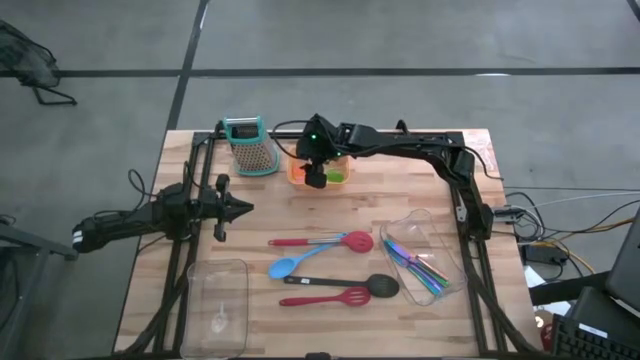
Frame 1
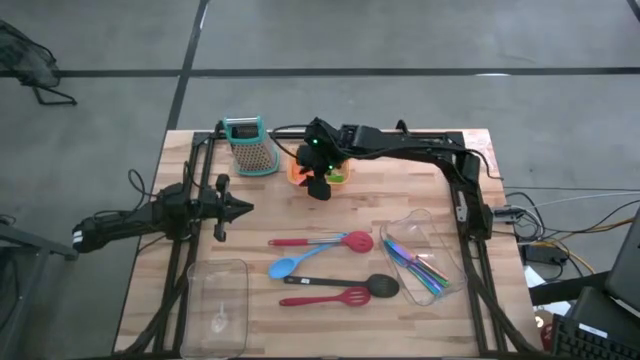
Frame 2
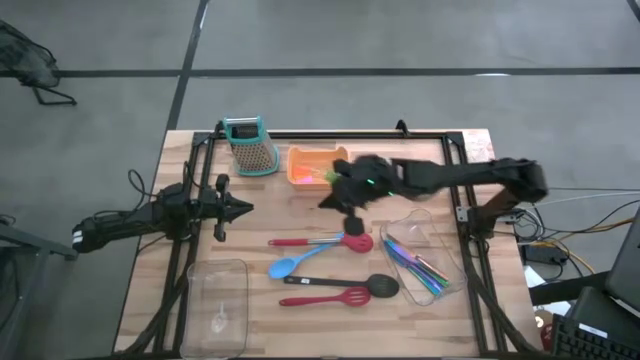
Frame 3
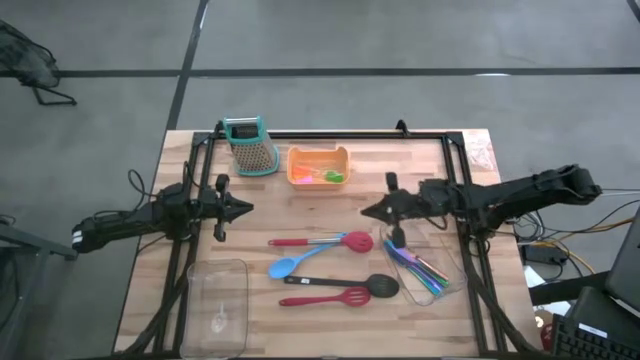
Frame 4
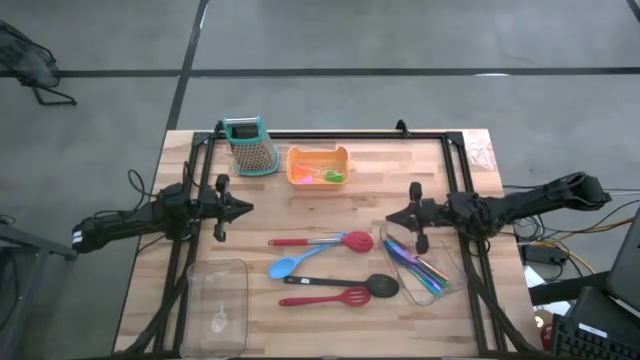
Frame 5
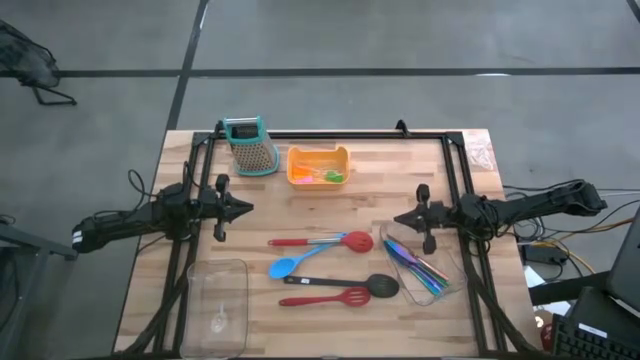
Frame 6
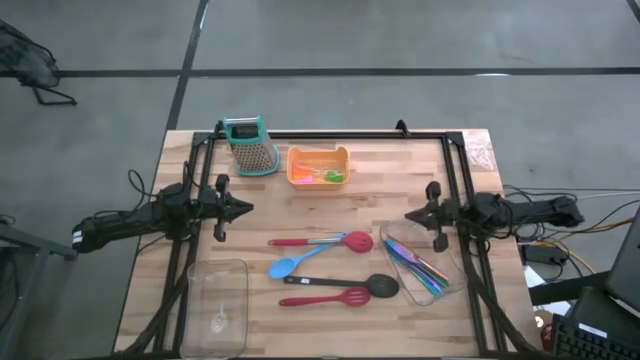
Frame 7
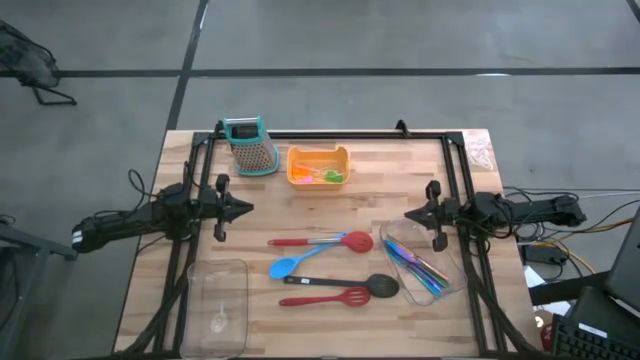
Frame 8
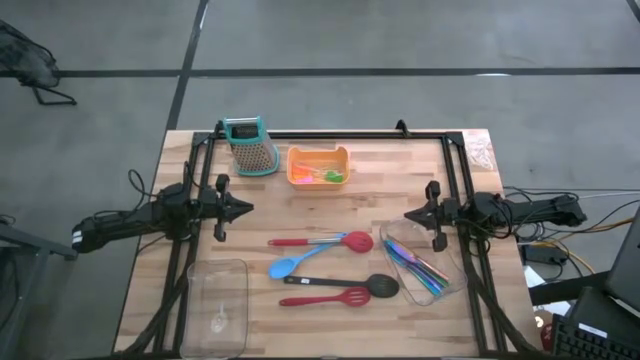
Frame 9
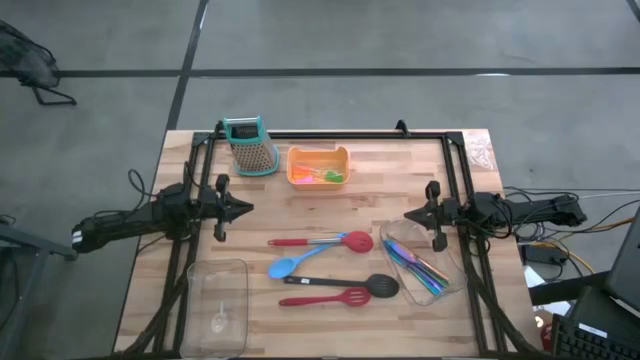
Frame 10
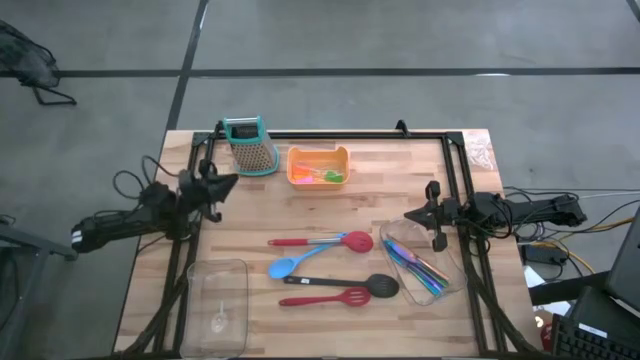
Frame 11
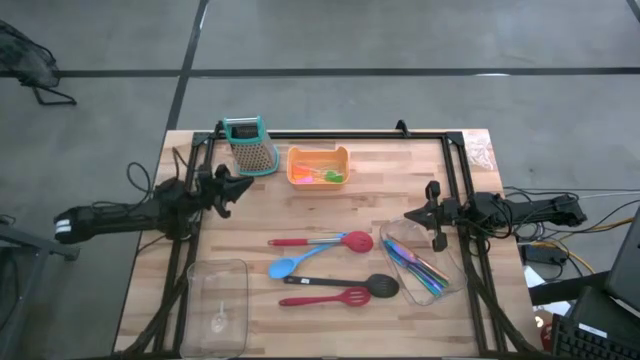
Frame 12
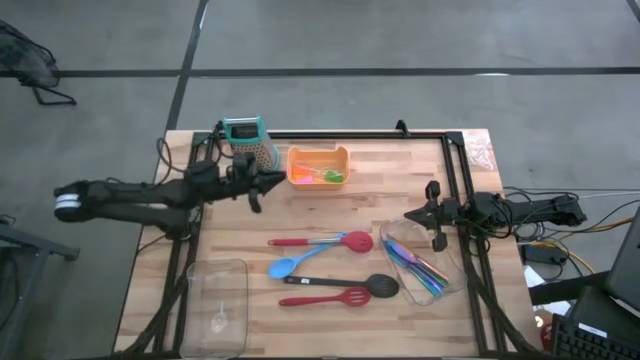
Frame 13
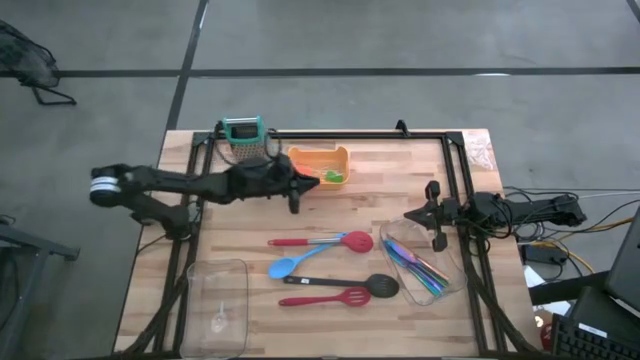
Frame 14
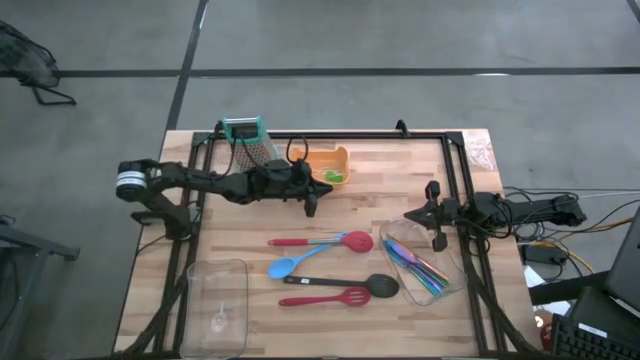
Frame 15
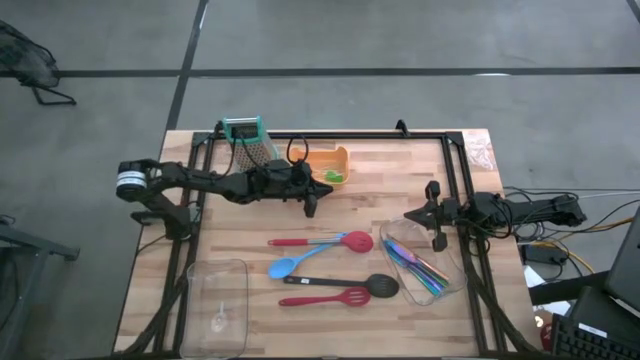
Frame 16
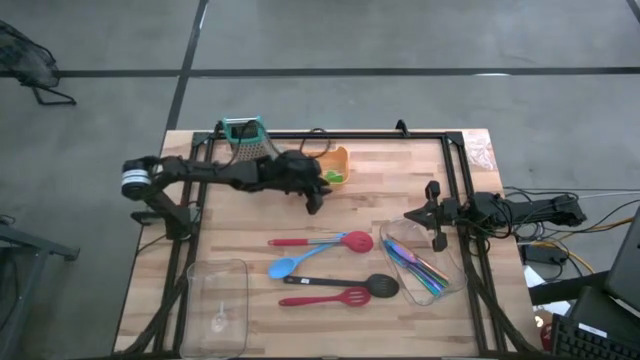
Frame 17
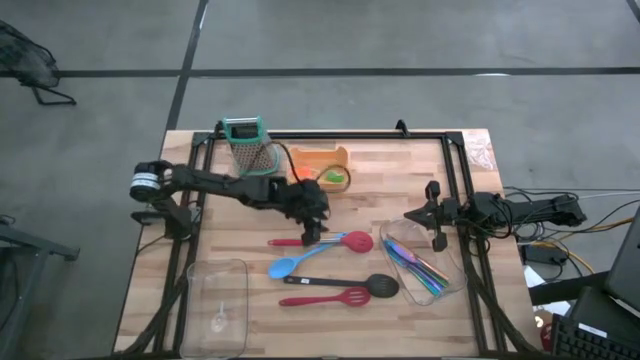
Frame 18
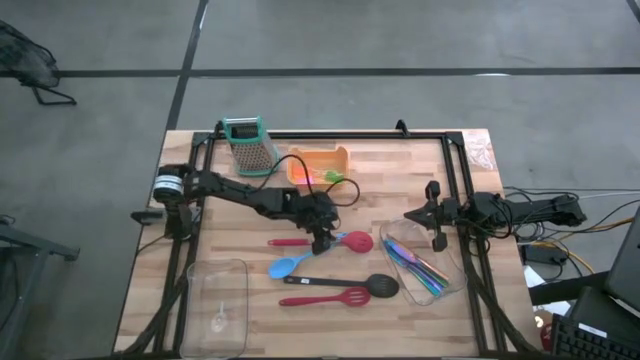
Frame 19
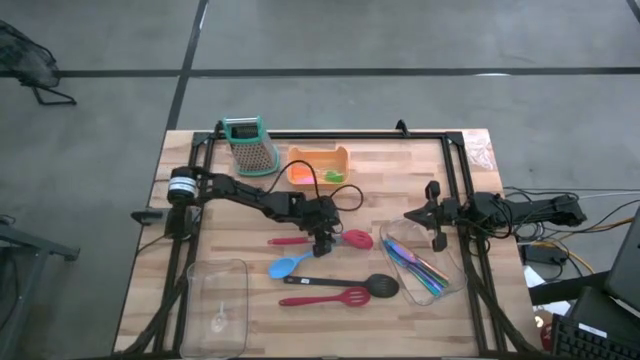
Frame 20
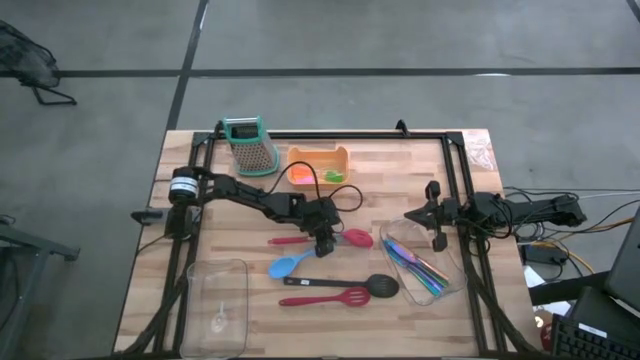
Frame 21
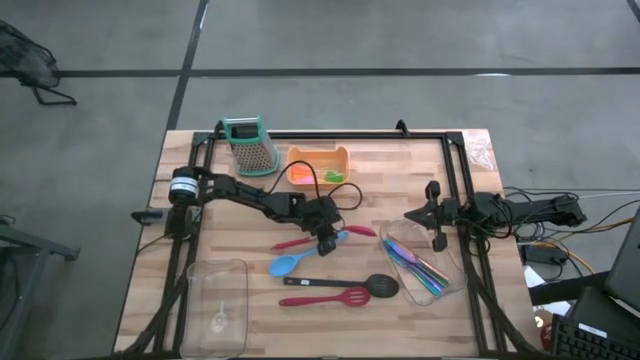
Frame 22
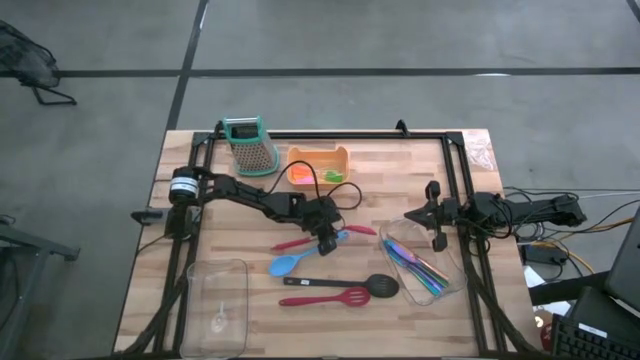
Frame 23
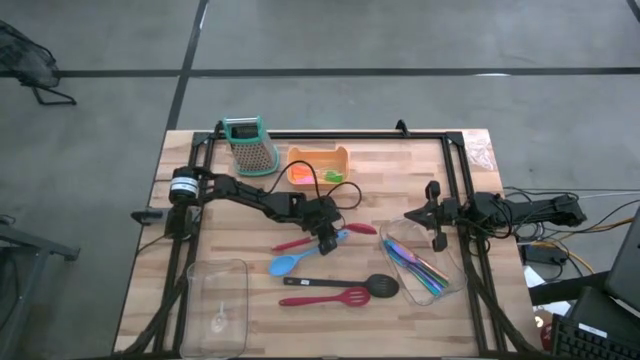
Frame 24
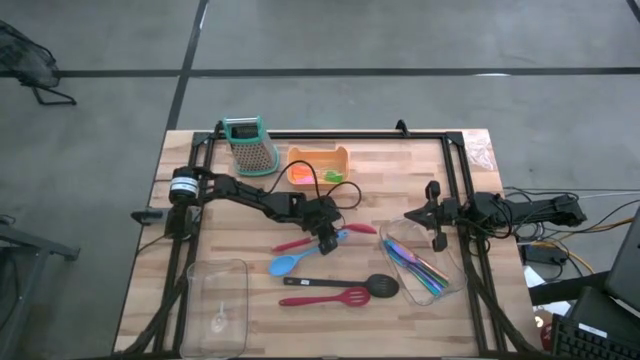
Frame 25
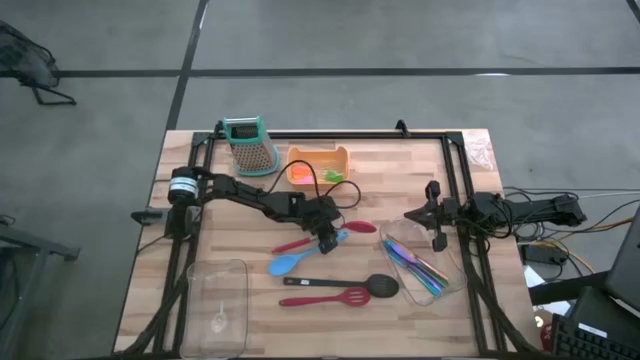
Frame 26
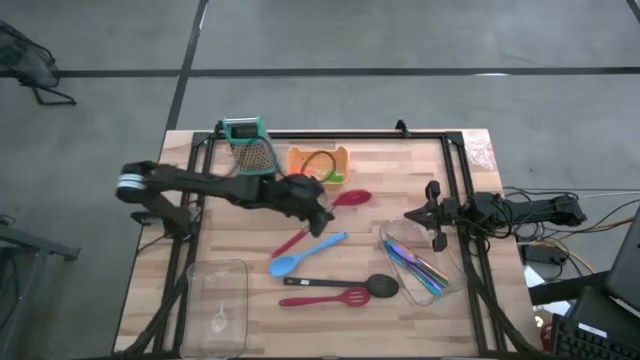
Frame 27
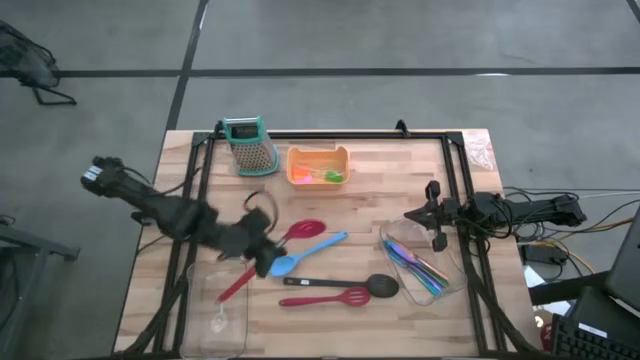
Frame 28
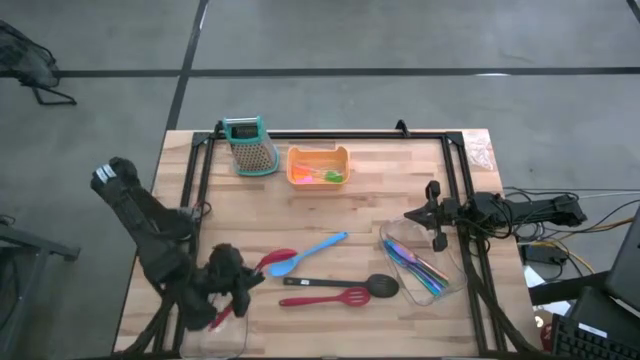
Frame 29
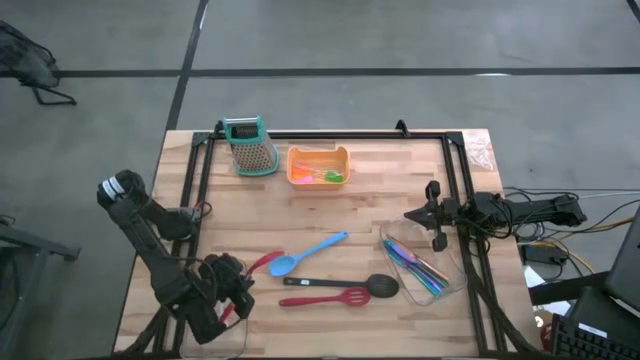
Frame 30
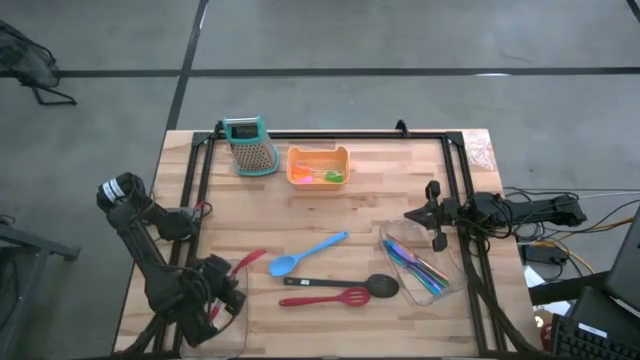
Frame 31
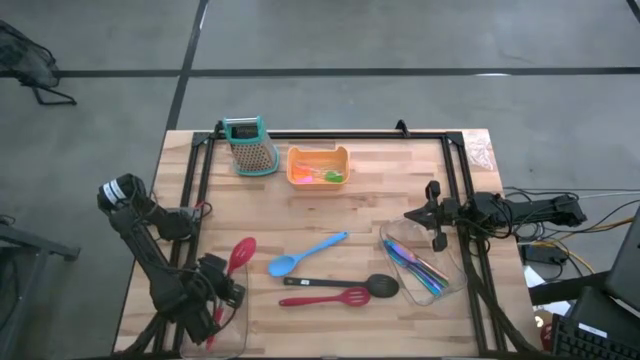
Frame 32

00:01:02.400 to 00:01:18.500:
Task: Pick & Place Kitchen Items
Put the red serving spoon into the bottom transparent bin

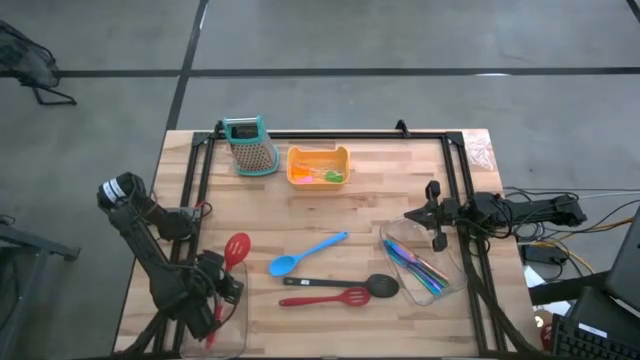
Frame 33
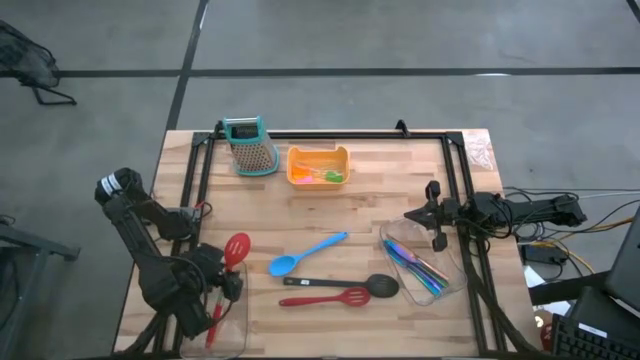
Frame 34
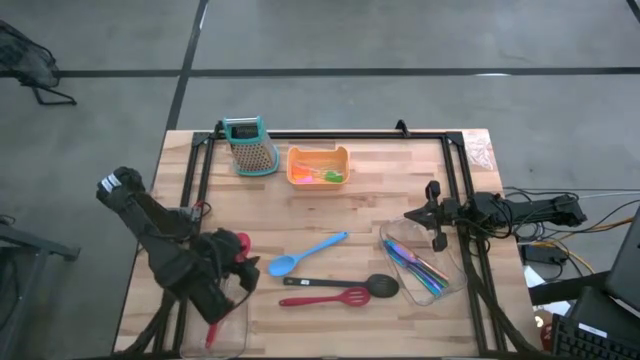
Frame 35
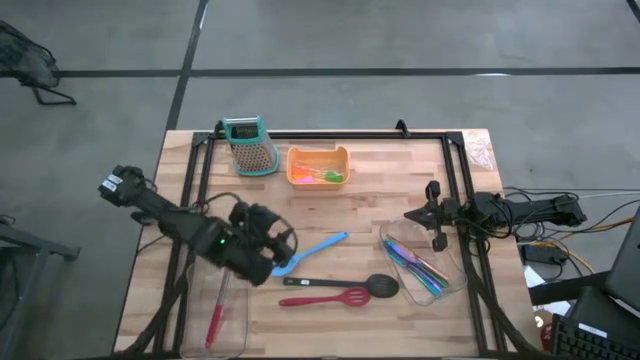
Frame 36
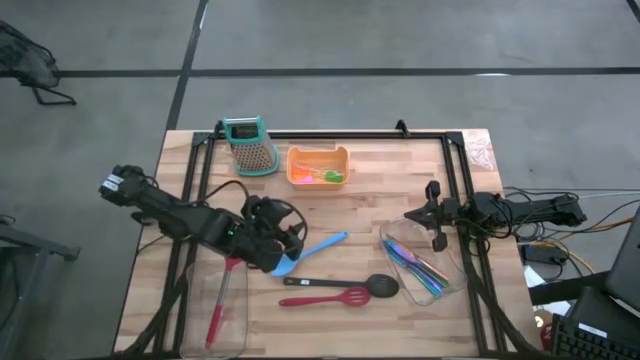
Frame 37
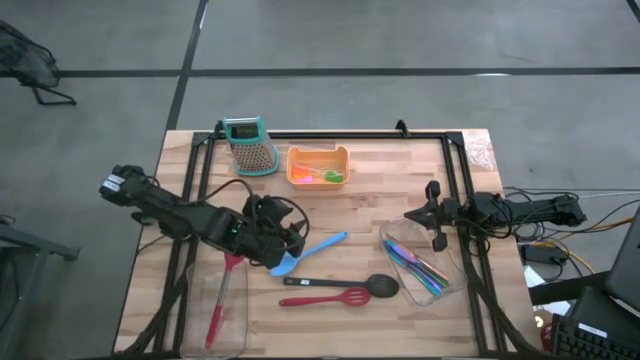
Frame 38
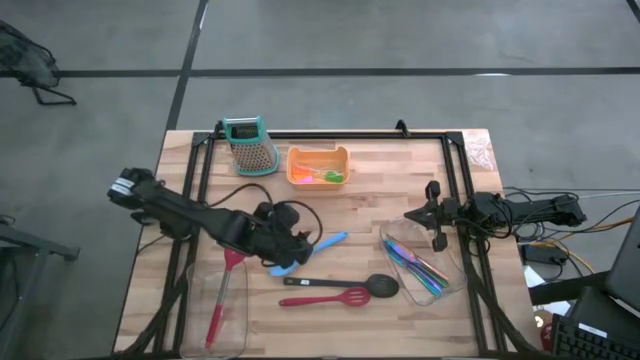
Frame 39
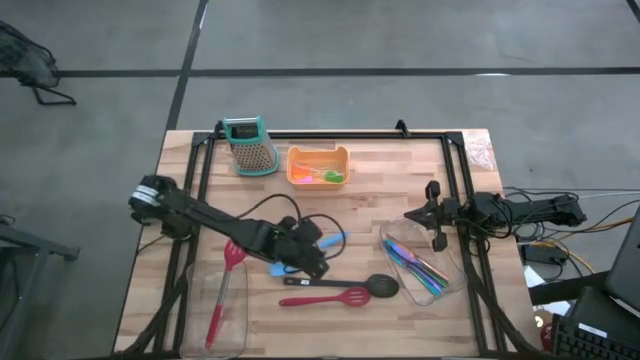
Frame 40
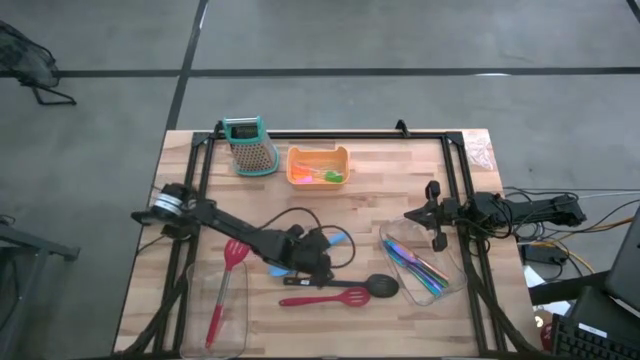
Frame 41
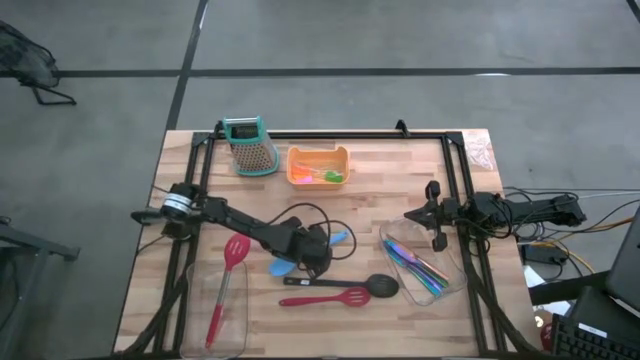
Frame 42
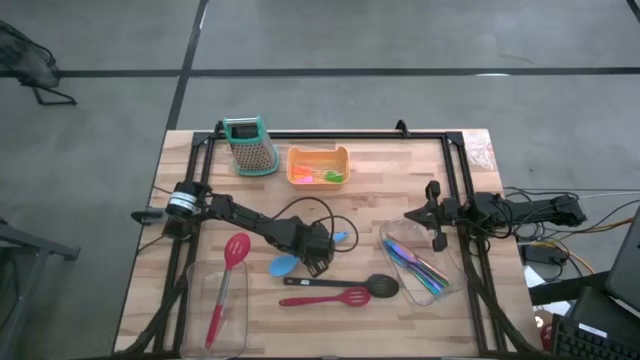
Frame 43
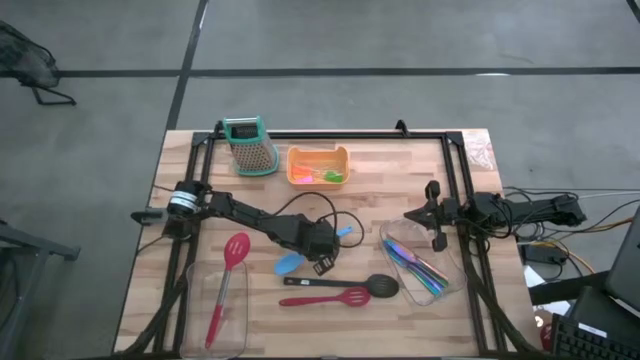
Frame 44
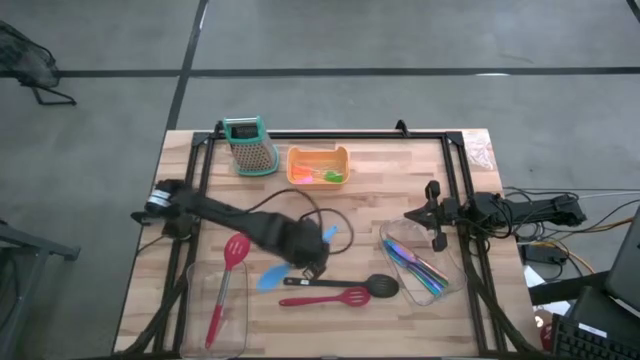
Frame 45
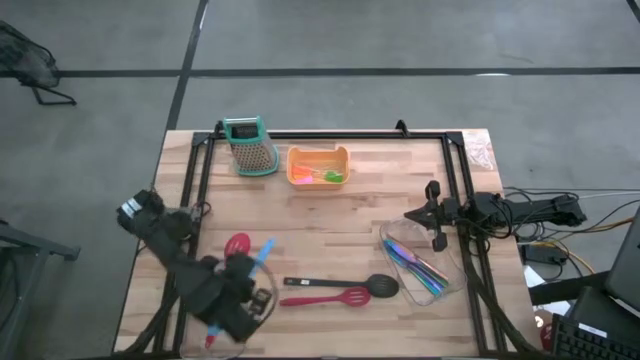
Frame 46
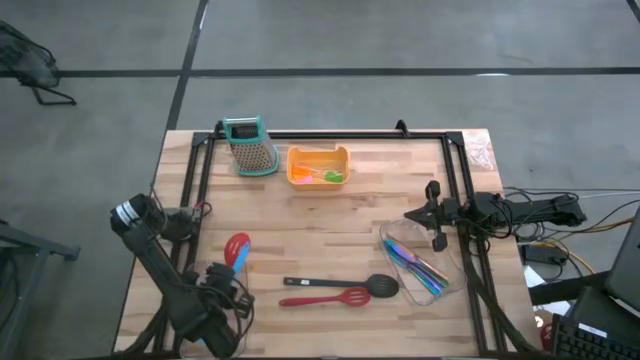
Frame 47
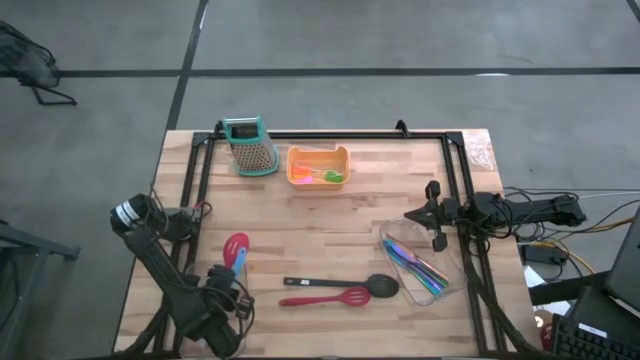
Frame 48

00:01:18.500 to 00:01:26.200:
Put the blue serving spoon into the bottom transparent bin
